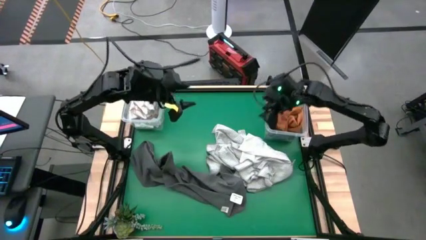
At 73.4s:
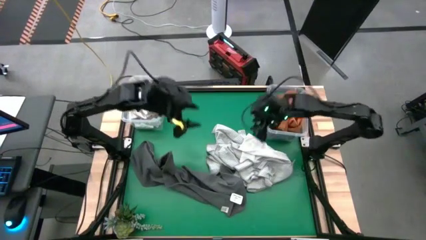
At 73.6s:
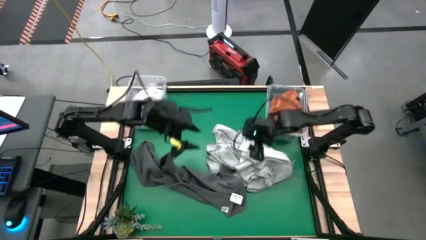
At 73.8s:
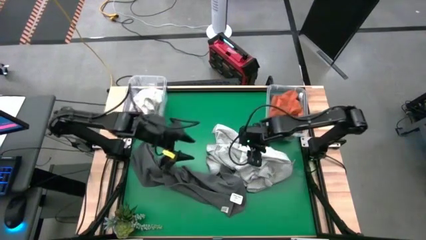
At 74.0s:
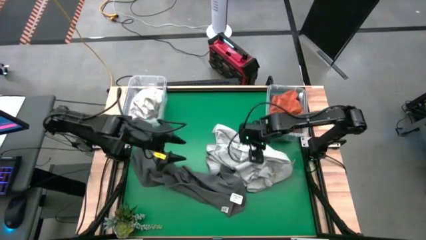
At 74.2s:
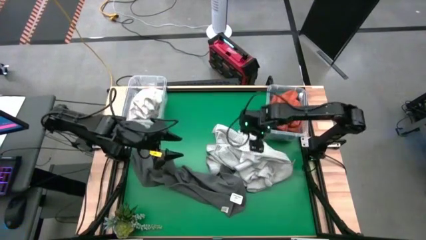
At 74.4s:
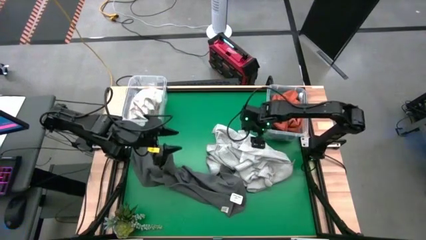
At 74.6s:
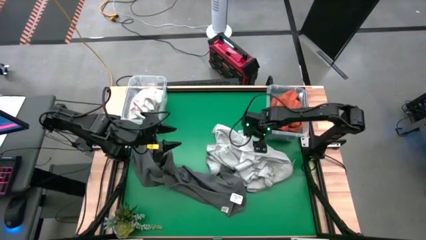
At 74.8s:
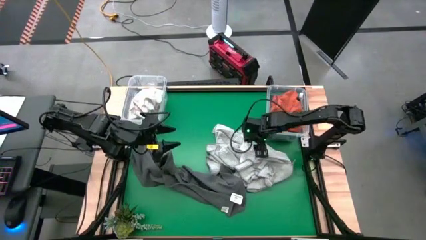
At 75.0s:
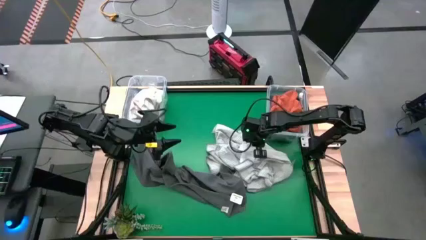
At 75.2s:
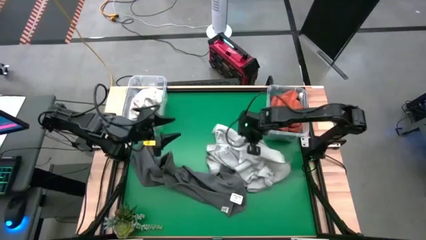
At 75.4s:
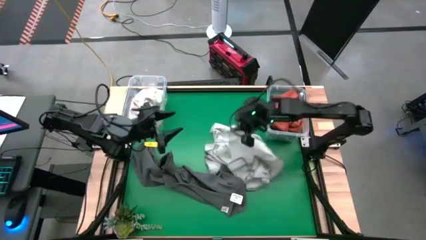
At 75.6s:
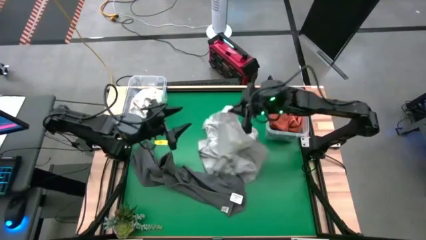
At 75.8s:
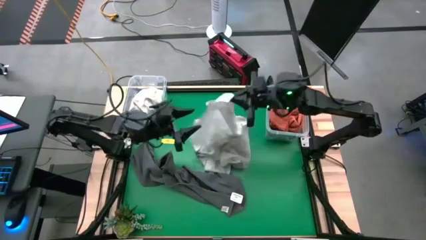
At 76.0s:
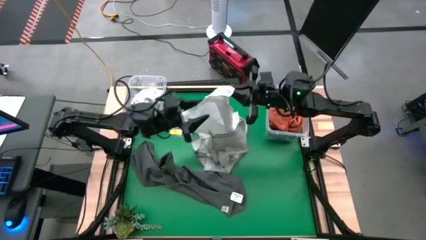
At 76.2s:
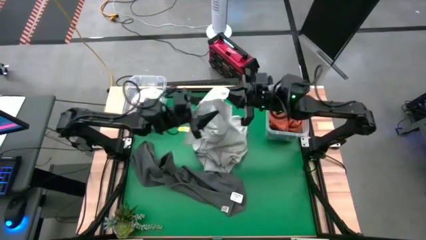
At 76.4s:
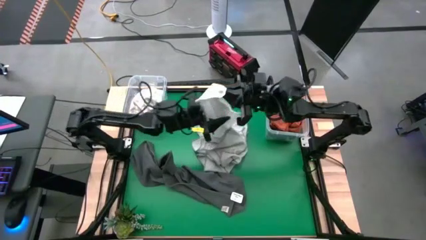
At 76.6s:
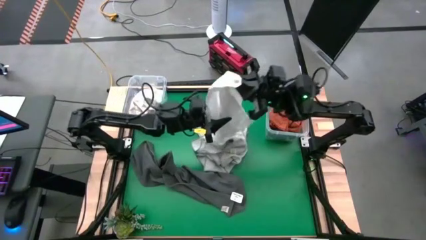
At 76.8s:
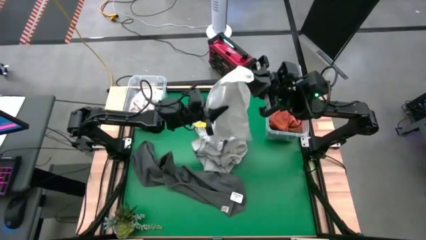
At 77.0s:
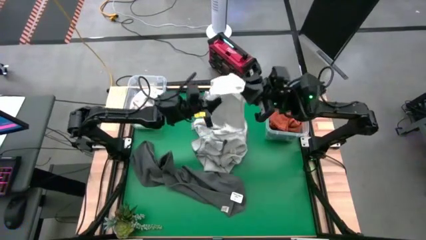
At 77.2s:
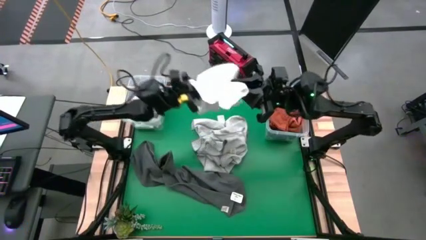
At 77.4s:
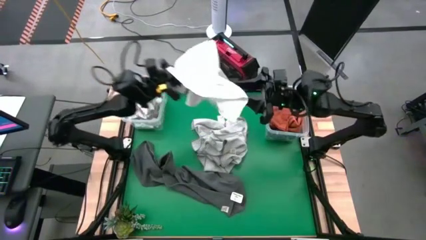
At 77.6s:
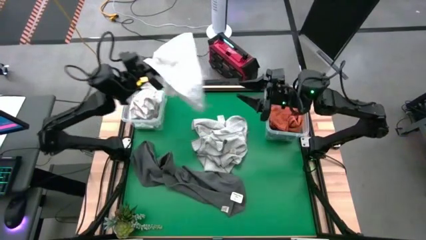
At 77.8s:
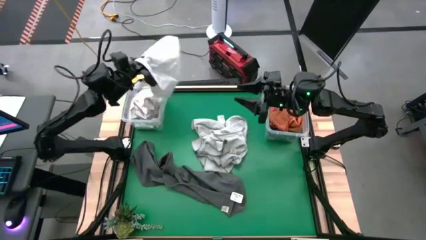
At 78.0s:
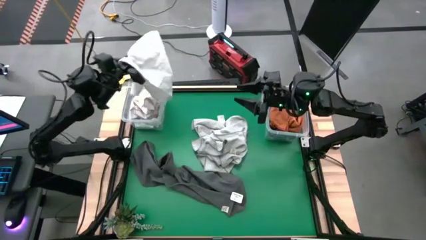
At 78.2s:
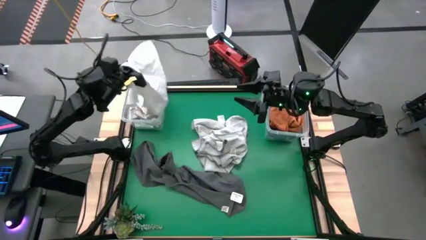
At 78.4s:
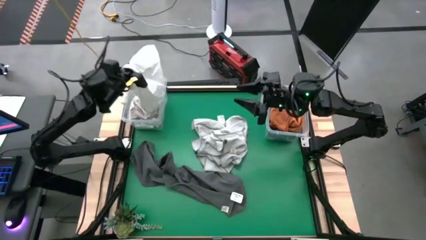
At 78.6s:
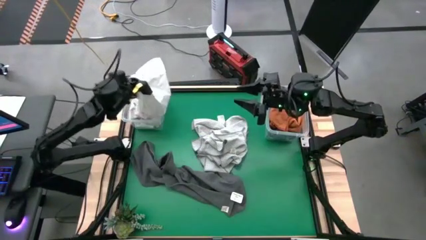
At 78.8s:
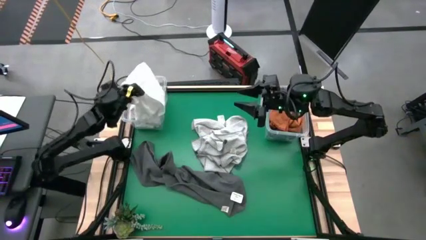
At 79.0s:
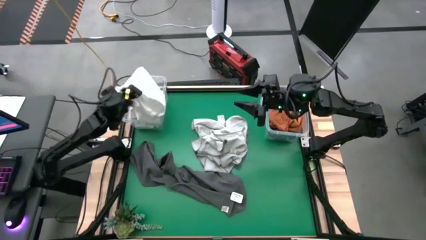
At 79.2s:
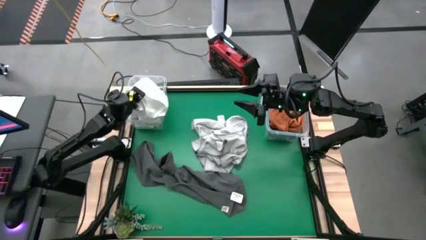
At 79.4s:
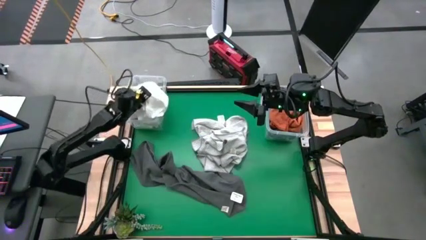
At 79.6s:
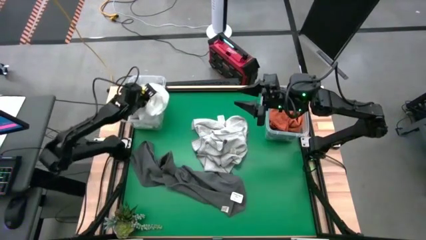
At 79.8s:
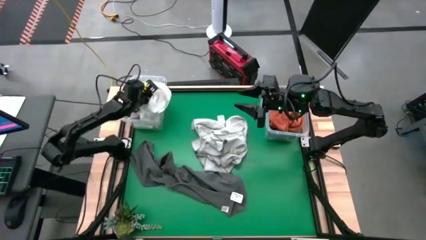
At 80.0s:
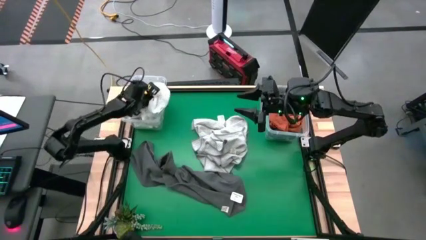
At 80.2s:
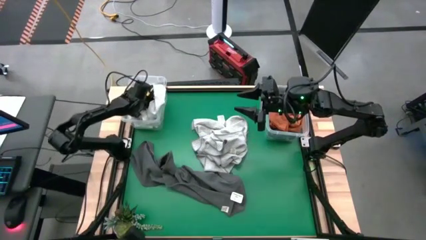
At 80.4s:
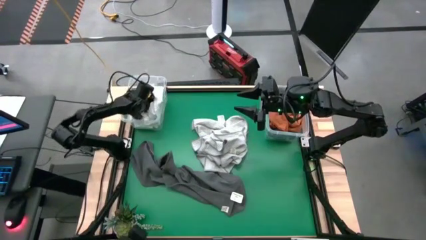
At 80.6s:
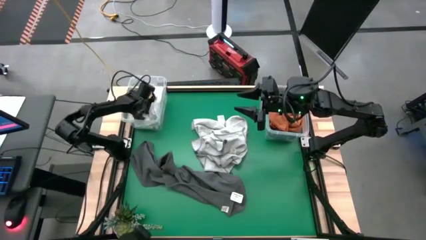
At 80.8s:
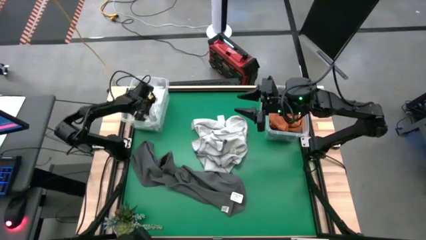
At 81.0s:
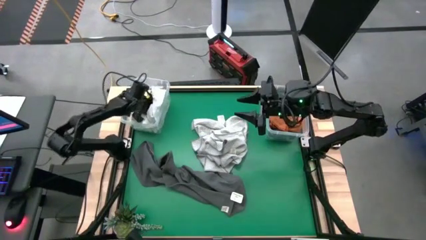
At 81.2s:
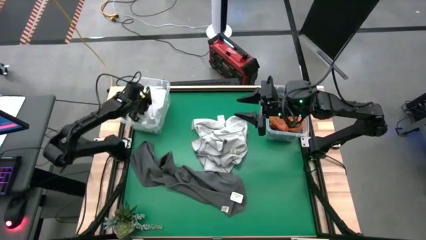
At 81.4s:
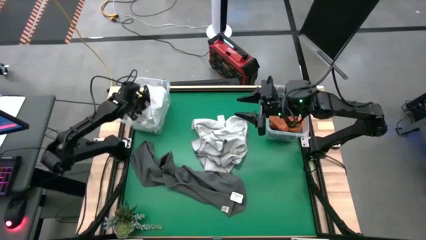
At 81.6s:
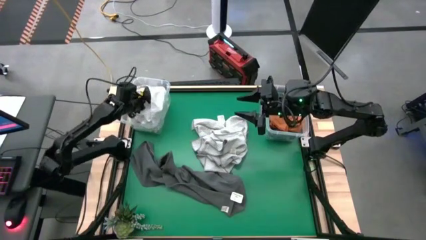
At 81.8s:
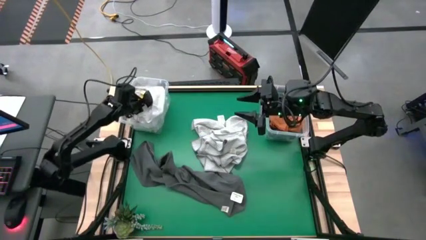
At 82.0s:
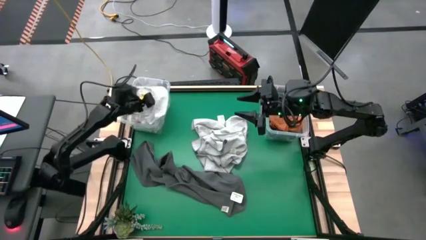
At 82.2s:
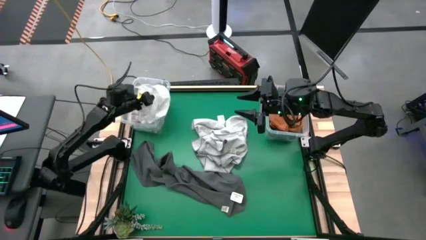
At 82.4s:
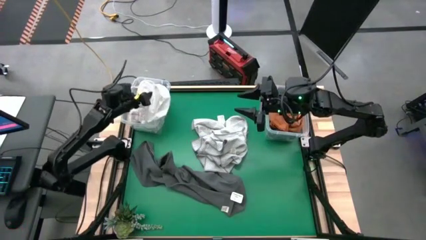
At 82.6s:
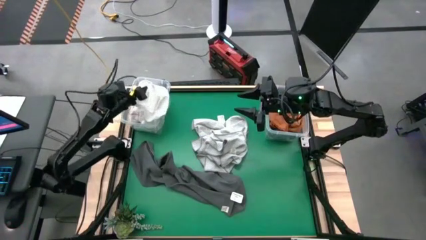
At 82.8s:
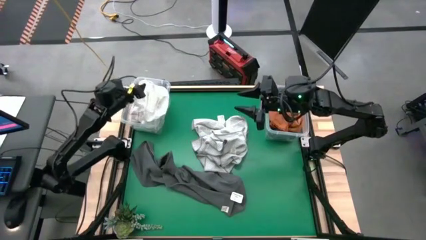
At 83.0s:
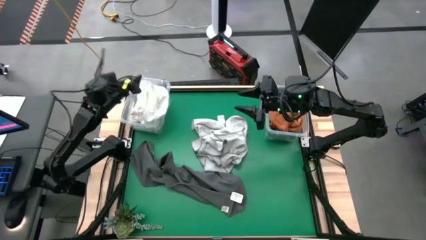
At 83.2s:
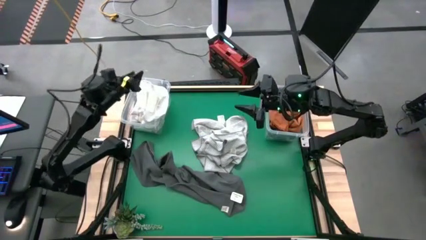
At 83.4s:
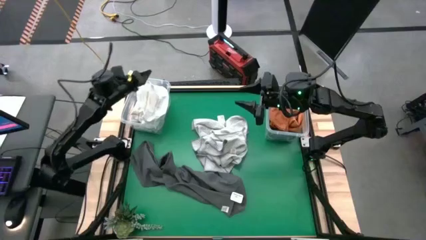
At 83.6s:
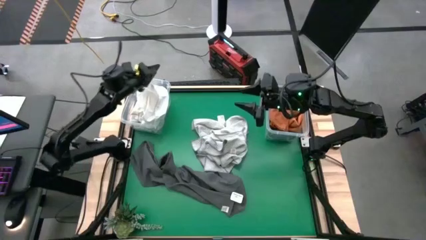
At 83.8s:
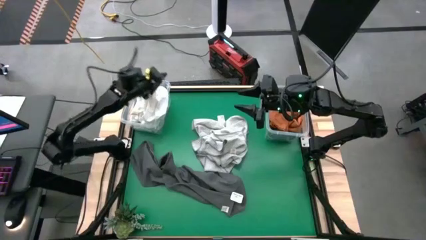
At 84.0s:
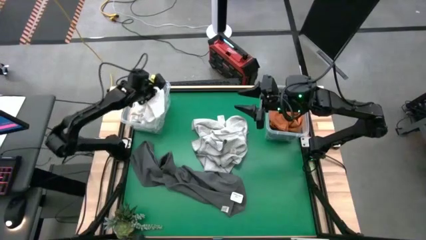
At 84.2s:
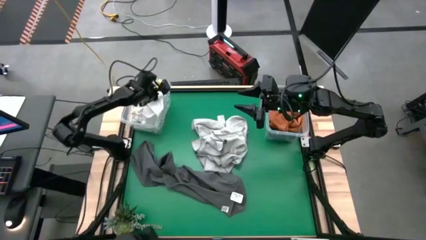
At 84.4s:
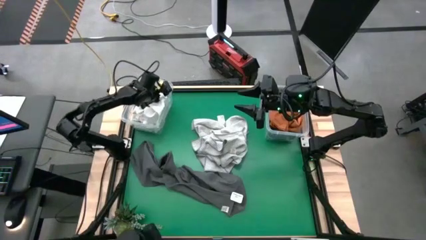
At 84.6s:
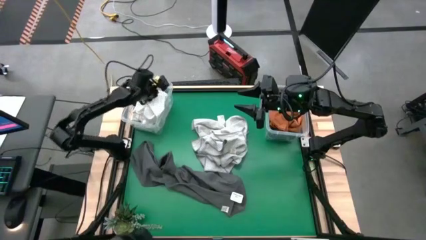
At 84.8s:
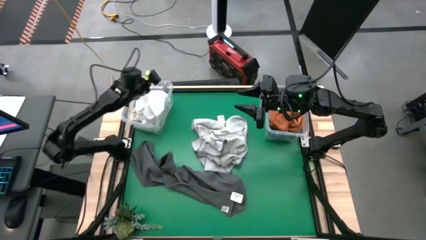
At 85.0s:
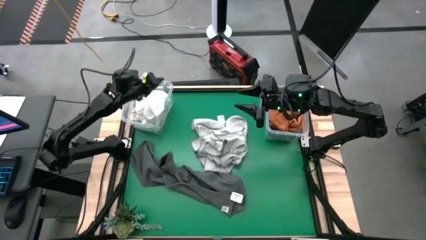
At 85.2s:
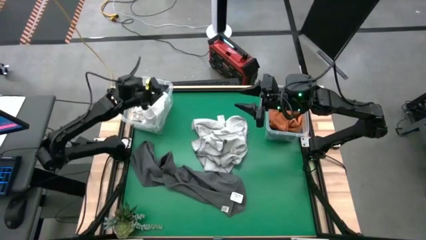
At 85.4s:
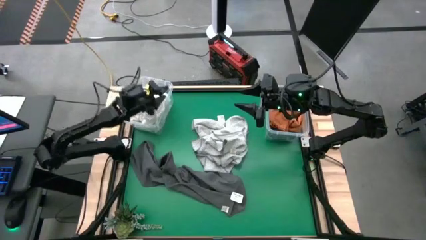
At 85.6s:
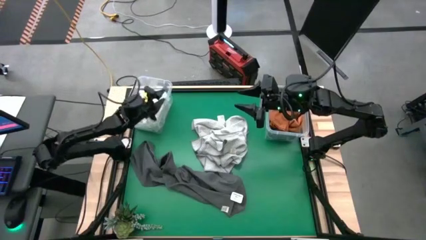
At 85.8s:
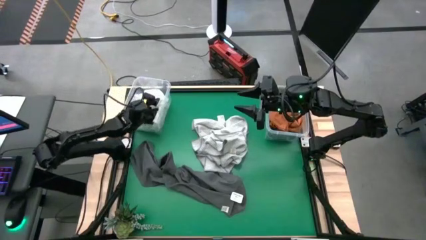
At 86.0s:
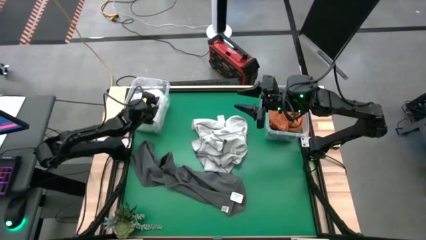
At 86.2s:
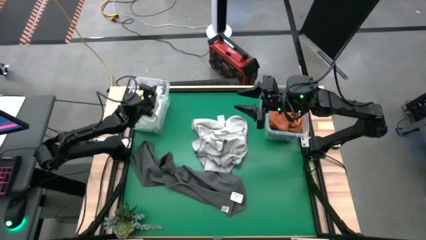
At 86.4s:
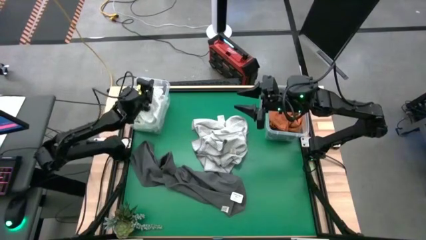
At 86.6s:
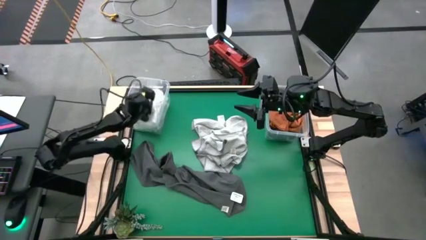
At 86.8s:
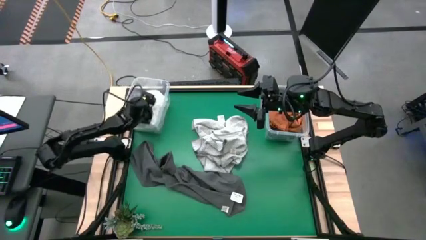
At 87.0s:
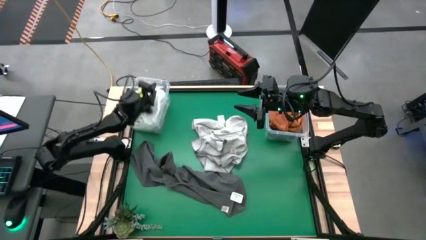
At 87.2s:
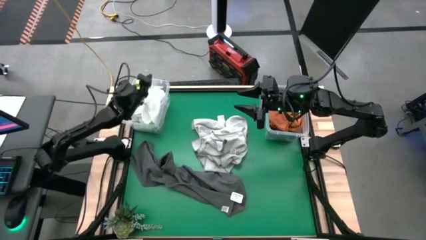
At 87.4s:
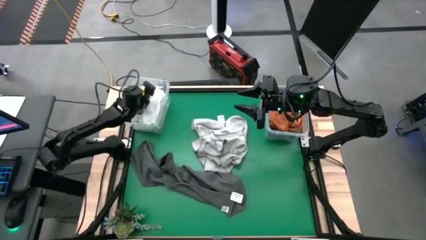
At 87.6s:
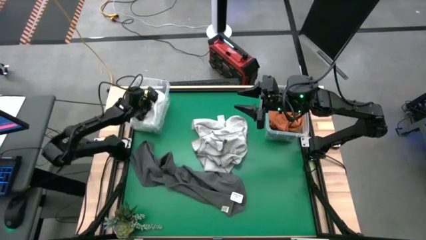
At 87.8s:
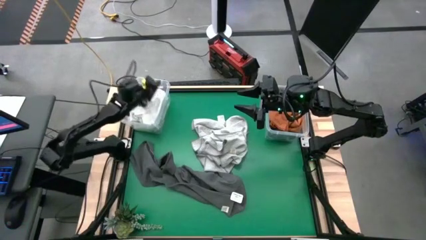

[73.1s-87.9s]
Task: Sort towels by color in basket
Put the white towel into the left transparent bin

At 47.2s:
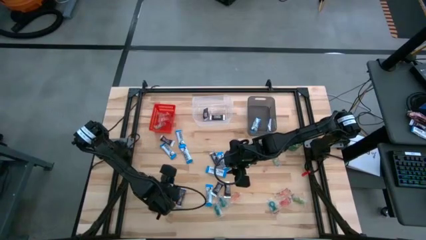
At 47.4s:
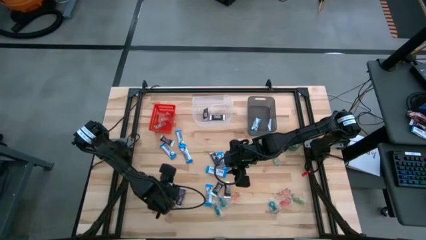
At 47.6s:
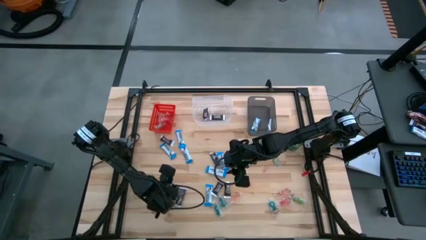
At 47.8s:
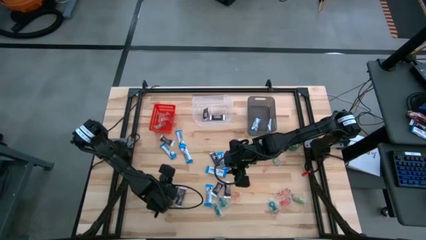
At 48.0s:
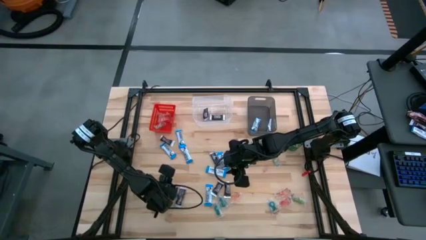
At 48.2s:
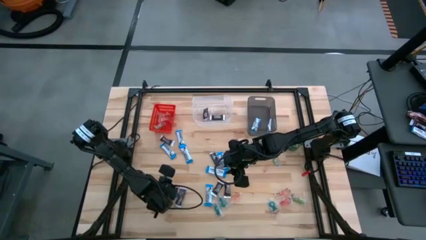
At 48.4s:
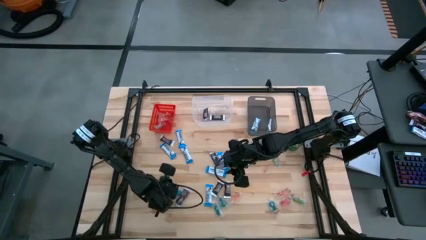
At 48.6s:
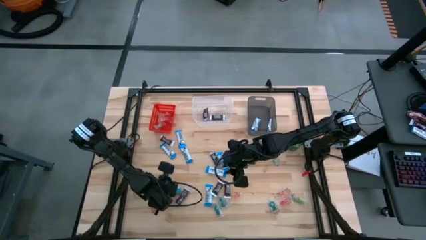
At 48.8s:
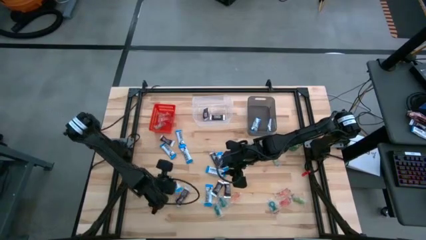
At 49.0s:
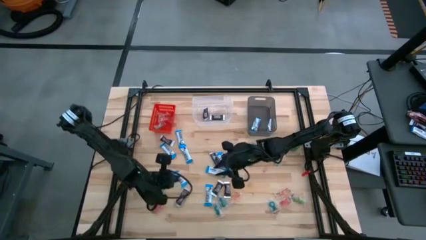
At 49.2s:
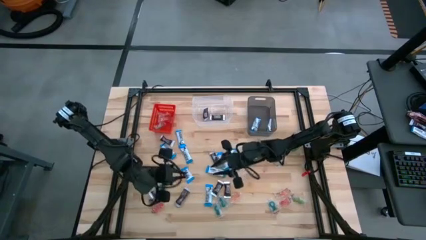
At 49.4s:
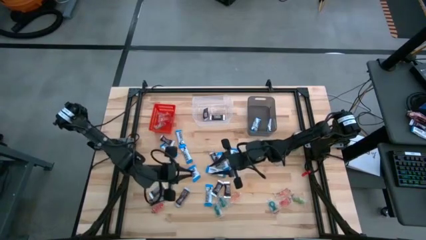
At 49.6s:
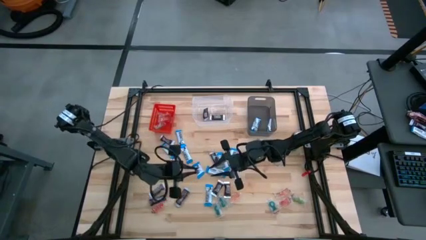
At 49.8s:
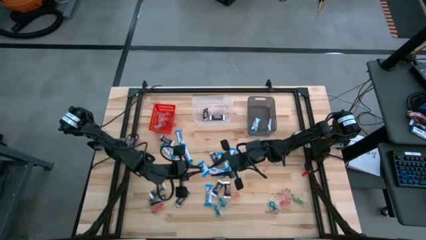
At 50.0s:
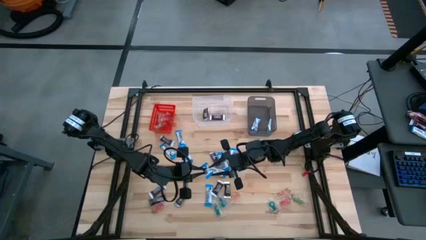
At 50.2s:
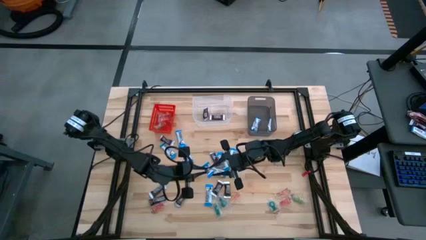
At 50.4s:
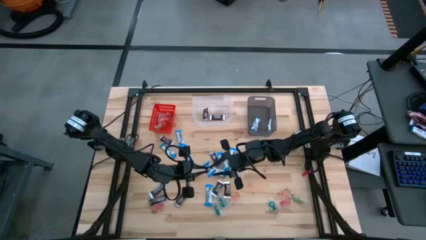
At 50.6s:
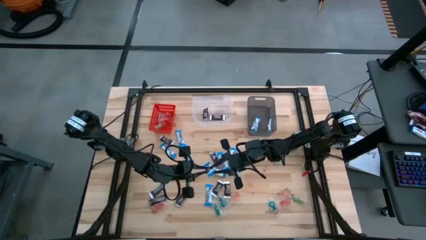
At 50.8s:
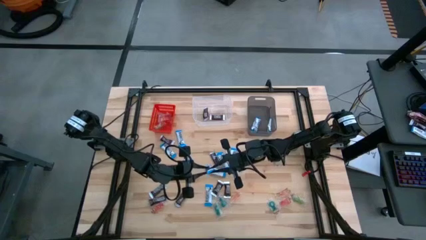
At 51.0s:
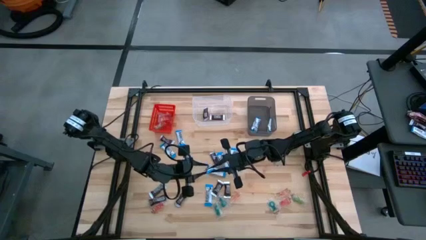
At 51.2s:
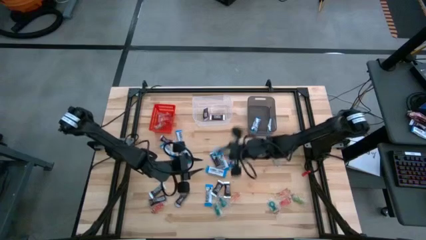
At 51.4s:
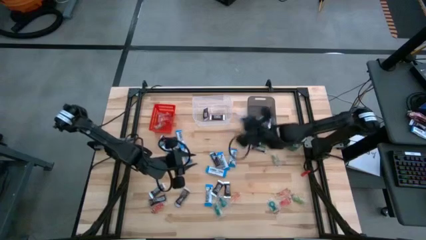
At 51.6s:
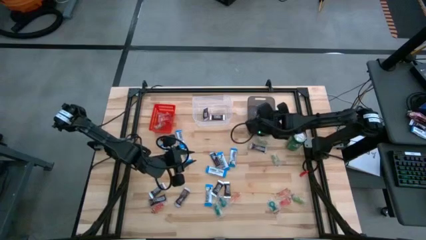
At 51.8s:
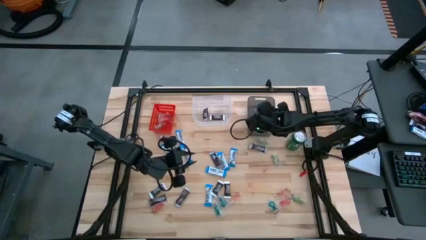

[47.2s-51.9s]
Task: Sort candy
Put the white chocolate bar into the black bin
